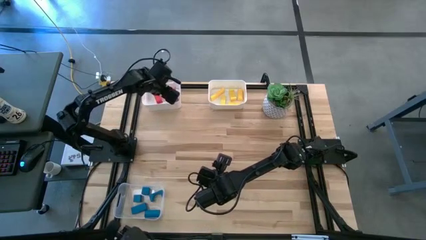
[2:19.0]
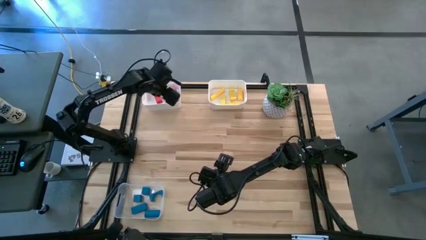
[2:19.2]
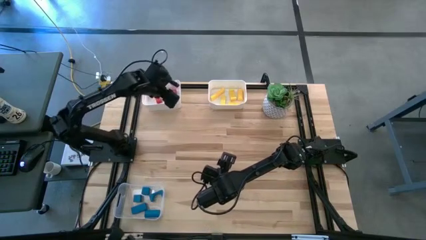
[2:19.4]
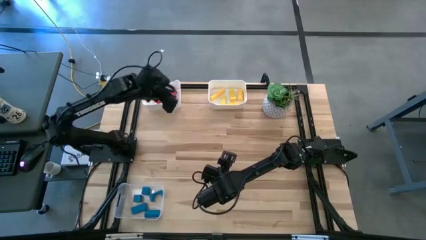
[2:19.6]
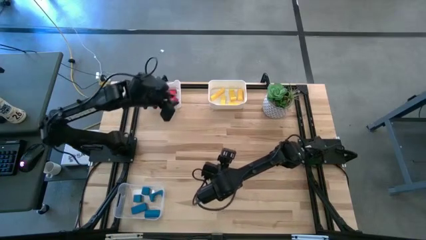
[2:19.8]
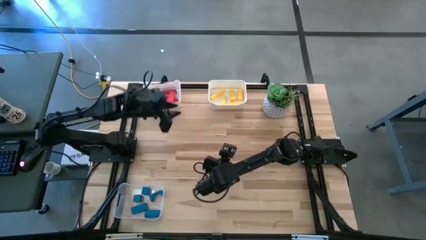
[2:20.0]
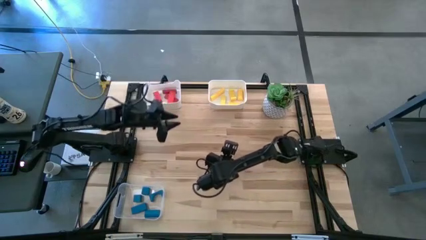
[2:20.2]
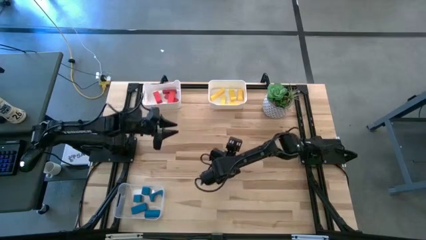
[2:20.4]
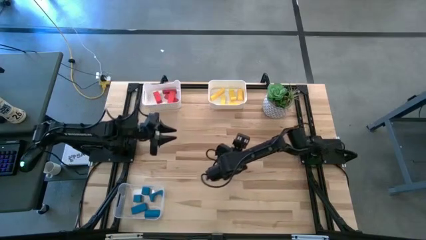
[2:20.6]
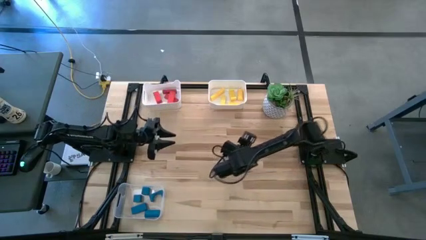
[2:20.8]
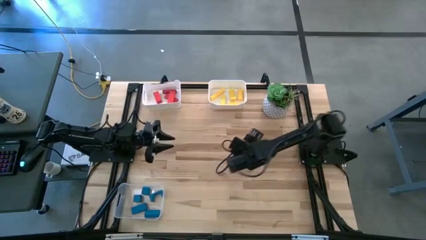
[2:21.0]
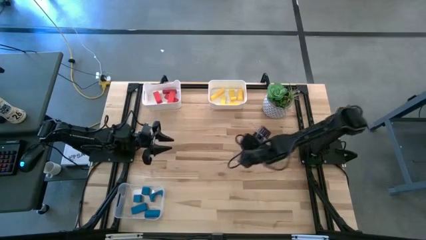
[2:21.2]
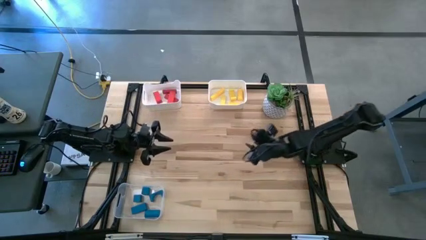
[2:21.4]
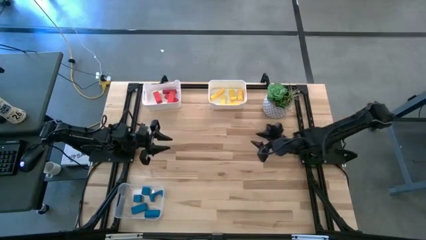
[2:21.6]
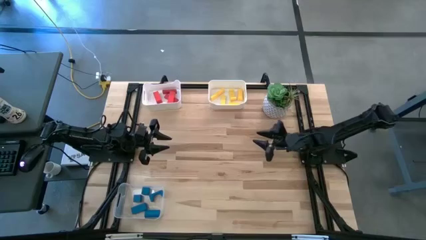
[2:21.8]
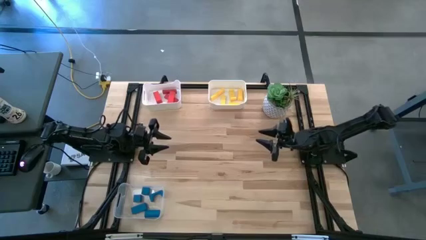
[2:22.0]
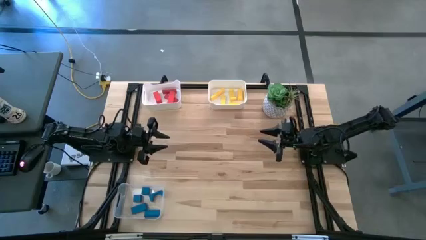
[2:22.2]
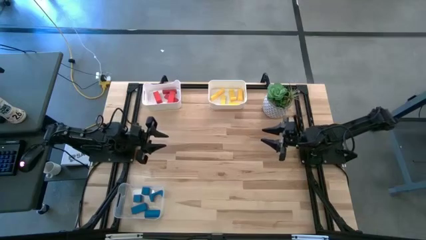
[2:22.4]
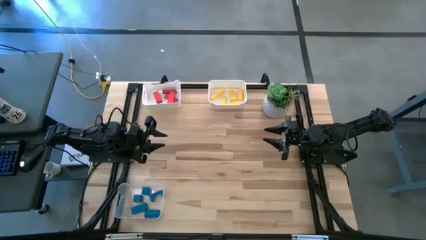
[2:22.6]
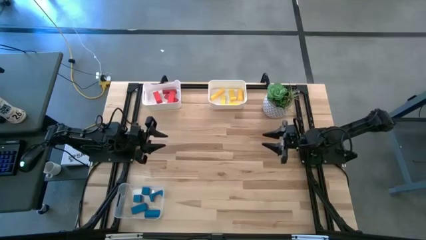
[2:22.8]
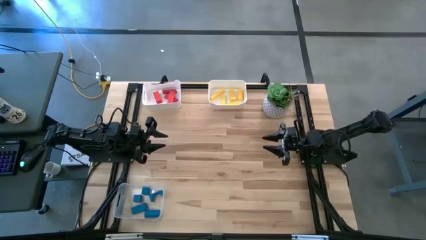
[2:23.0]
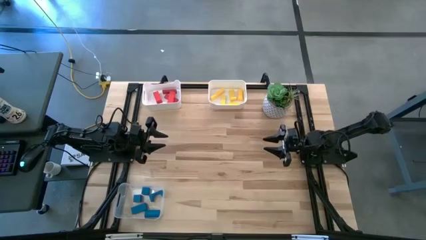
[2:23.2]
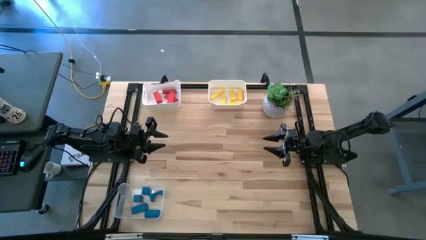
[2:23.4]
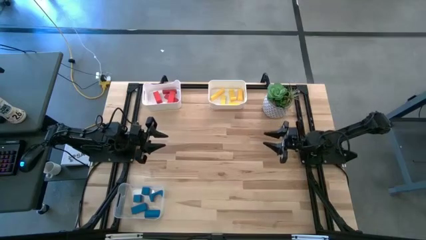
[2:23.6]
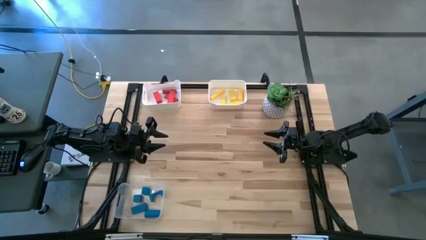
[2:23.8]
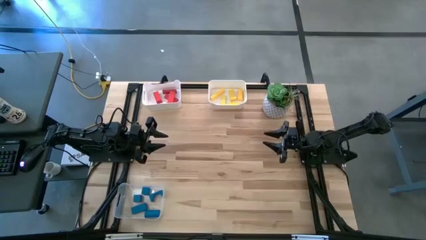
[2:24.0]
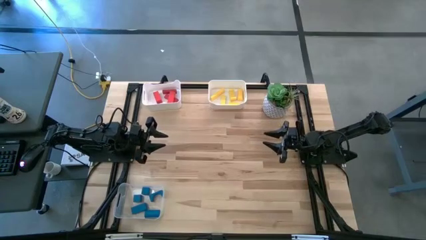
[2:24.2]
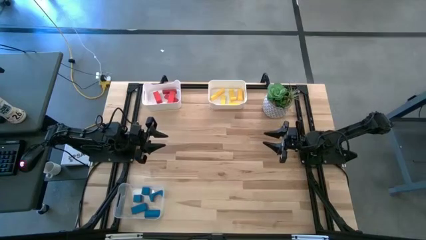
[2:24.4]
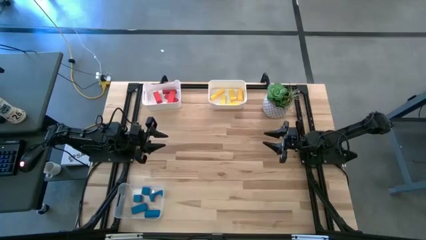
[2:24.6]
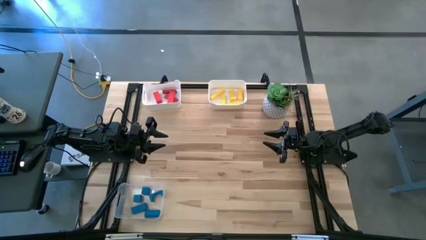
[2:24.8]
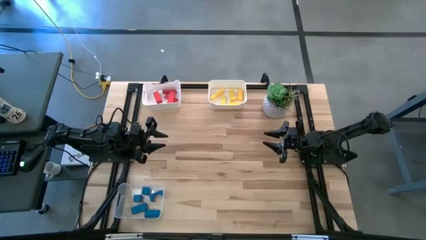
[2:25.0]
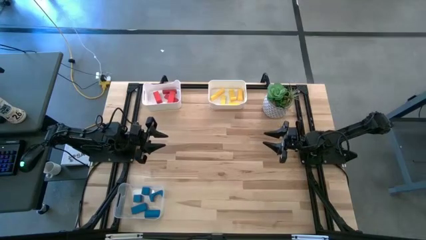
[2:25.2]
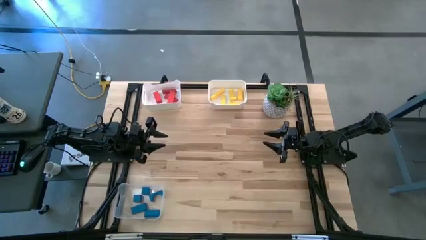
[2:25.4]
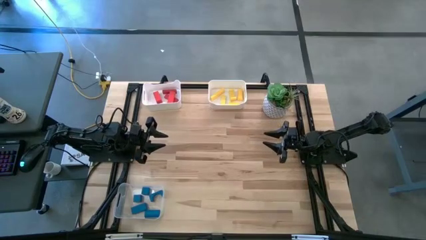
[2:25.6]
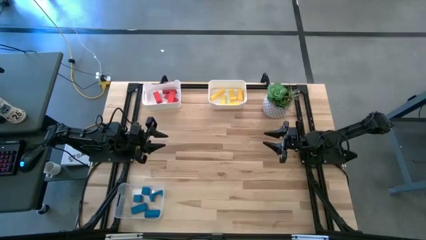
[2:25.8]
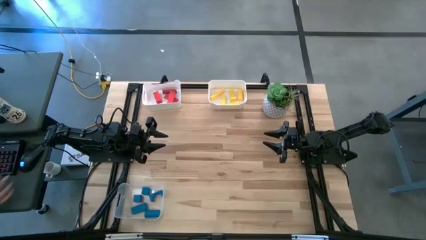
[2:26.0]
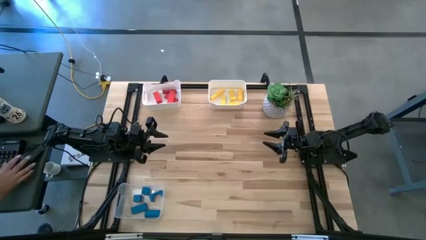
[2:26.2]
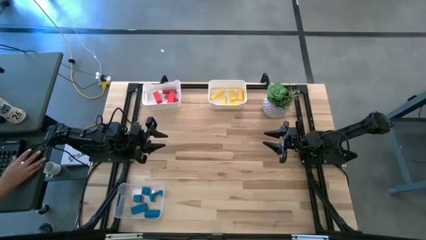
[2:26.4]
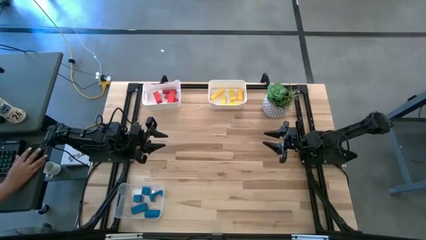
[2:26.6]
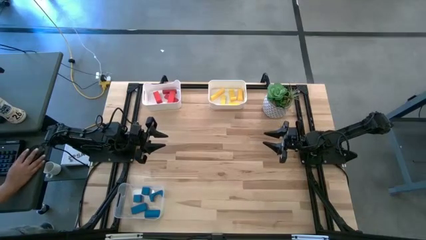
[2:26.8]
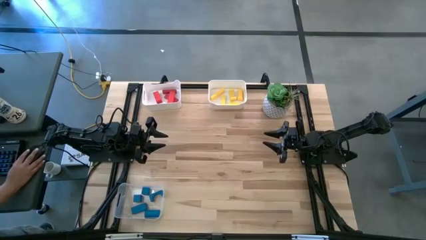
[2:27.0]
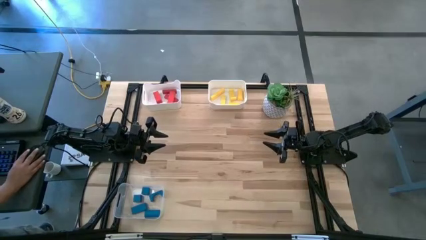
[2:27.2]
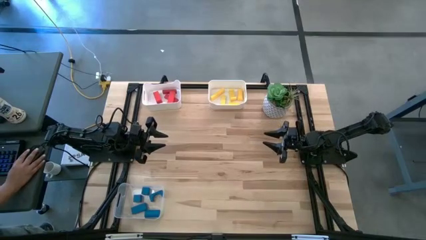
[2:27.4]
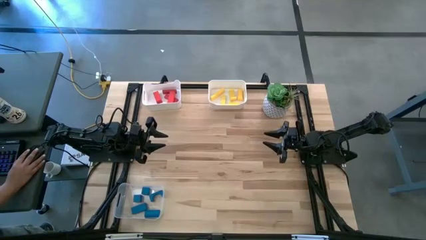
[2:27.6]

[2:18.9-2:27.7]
Task: Sort & place blocks by color
Return to Home Position

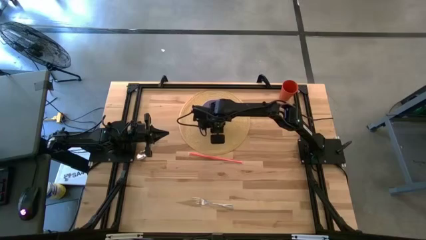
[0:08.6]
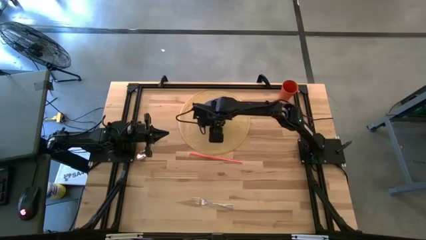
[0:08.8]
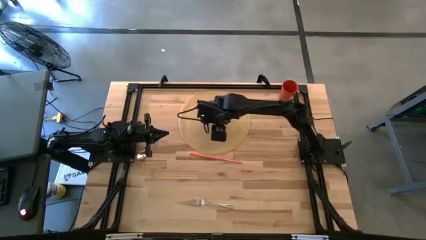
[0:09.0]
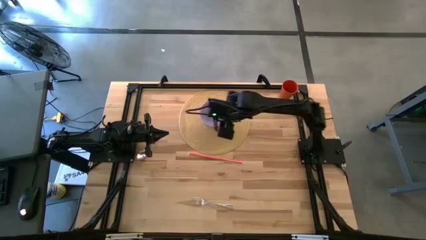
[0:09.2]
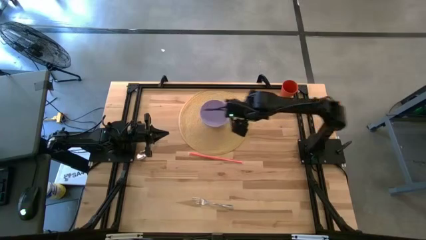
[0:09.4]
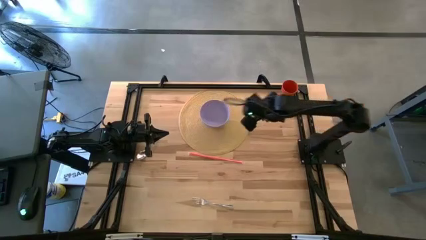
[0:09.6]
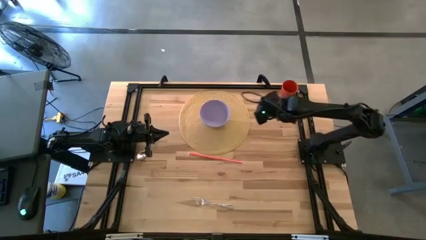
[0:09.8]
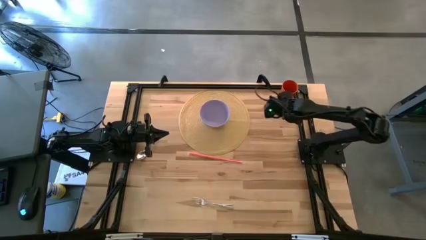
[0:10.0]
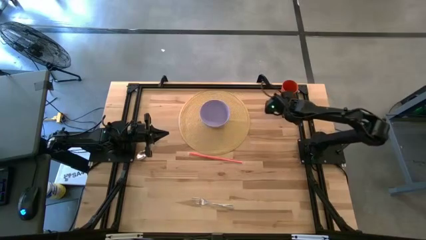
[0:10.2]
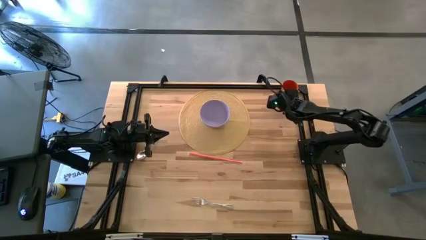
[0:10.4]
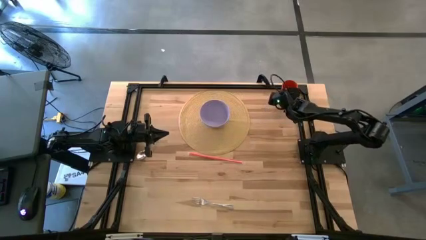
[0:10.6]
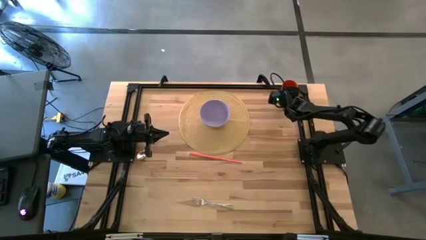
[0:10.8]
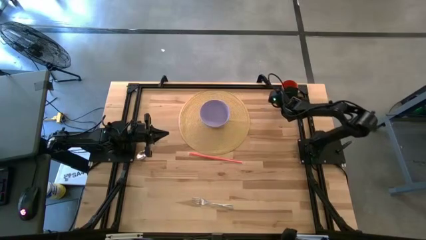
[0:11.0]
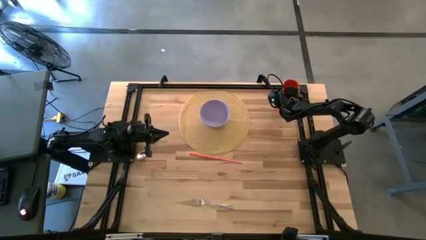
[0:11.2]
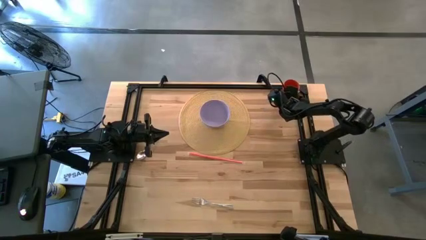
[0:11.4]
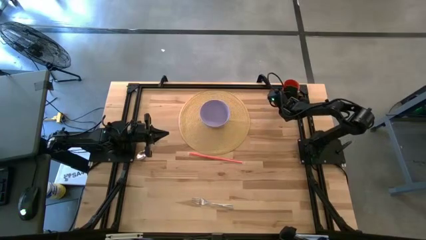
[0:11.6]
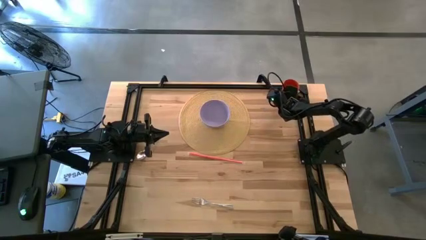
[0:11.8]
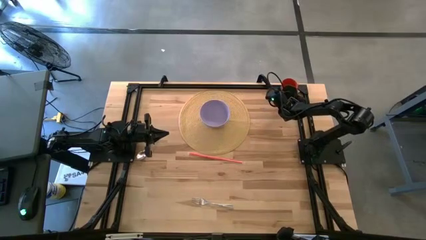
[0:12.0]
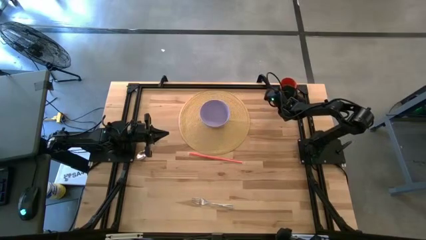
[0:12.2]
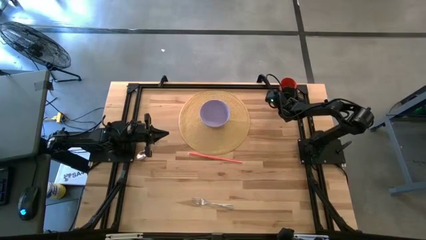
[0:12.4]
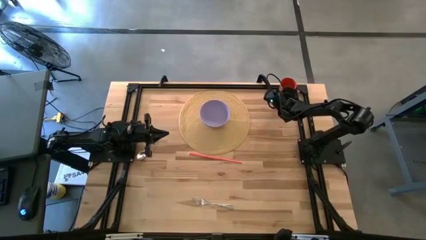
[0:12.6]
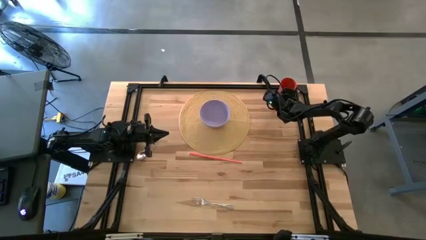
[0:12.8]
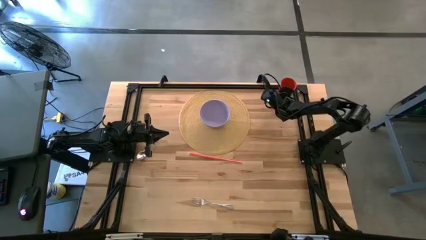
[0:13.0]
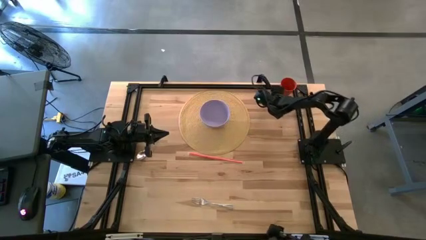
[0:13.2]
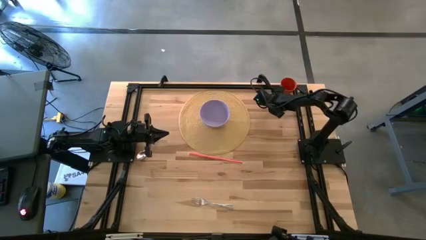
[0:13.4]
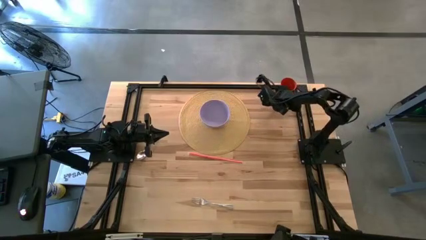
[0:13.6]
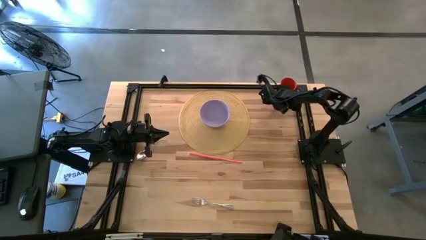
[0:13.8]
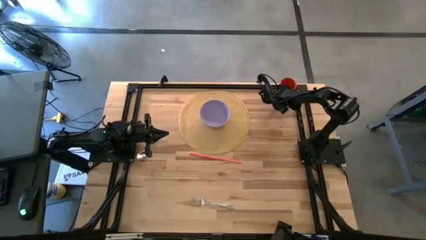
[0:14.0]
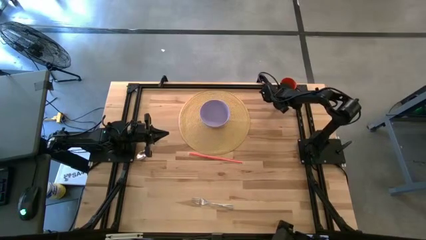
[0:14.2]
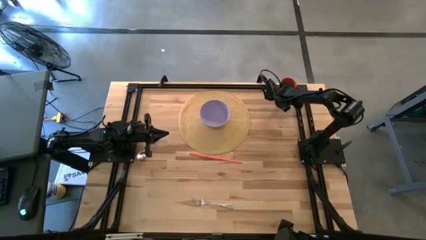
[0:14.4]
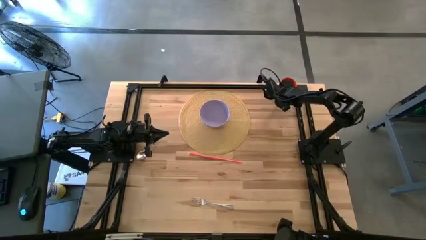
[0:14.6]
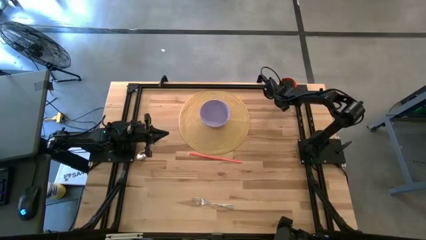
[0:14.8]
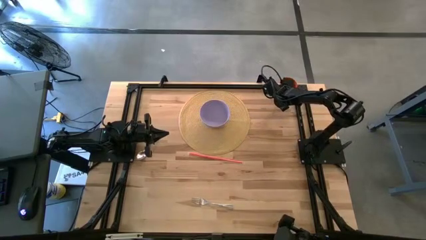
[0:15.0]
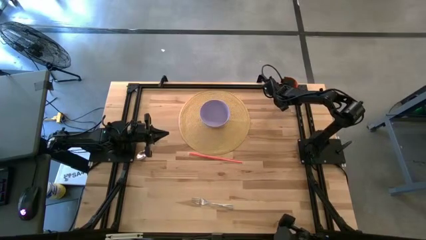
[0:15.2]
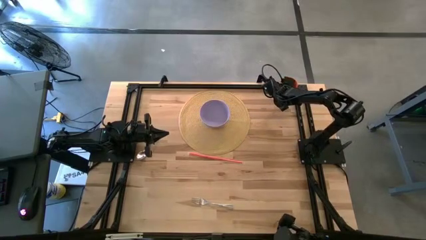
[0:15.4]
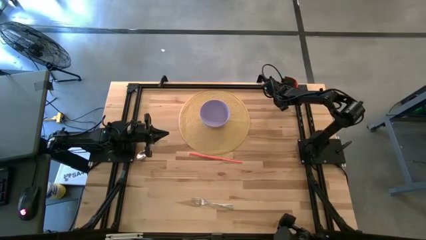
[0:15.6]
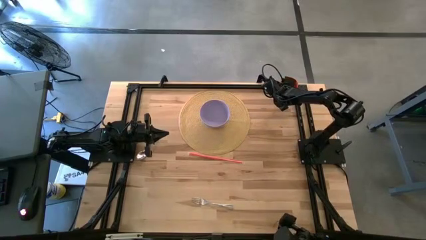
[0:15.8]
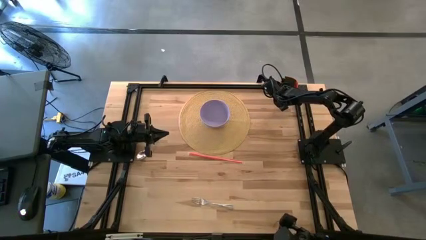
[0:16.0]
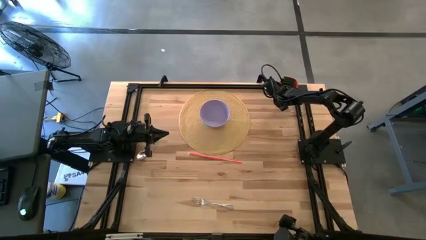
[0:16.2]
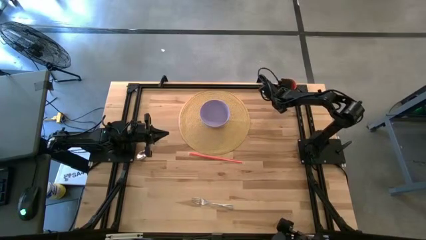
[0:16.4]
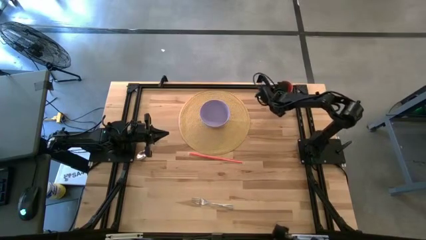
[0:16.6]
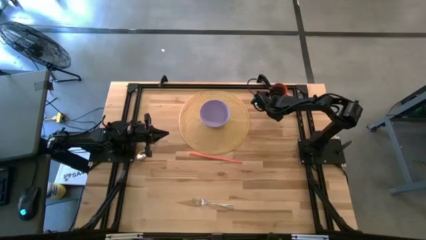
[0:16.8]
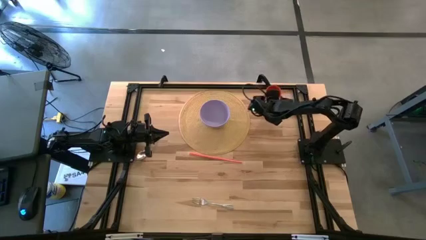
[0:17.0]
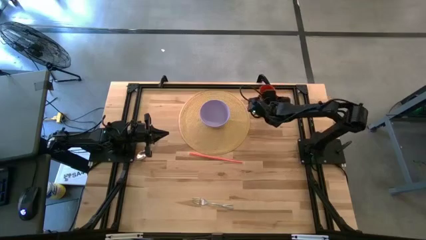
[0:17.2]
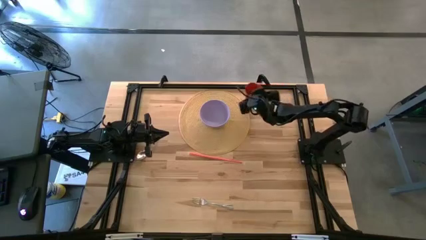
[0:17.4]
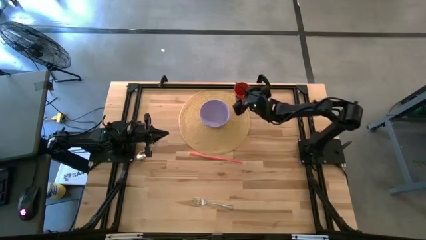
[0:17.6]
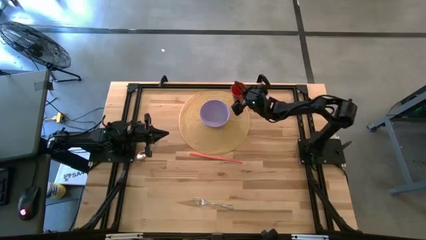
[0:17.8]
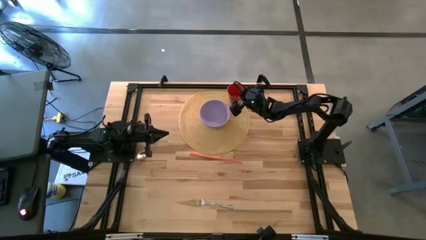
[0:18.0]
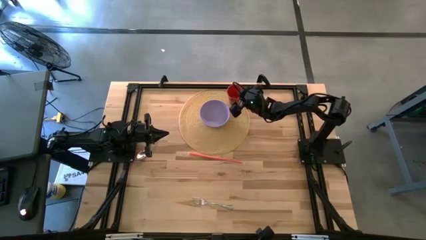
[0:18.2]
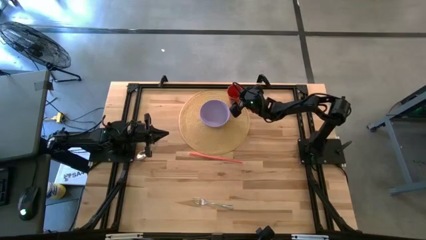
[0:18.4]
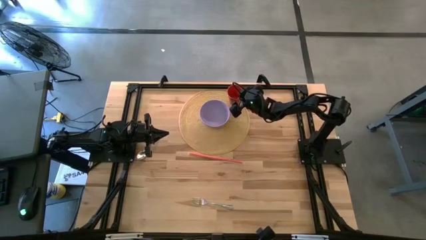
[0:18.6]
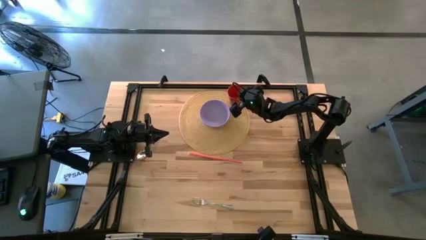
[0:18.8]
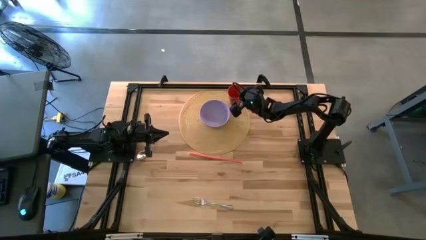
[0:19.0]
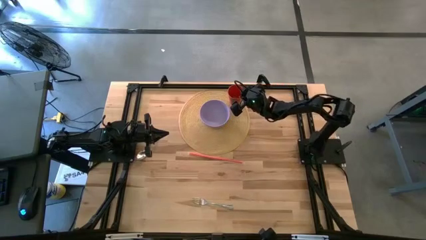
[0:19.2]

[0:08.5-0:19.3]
Task: Pick & Place Utensil
Put the orange cup on the brown mat to the top right of the purple bowl
